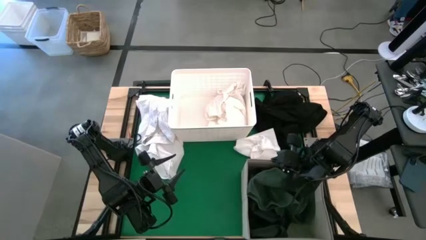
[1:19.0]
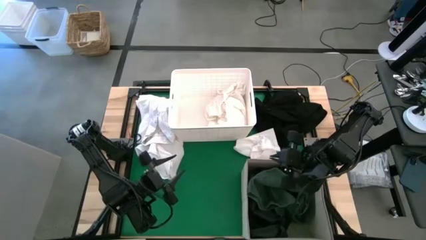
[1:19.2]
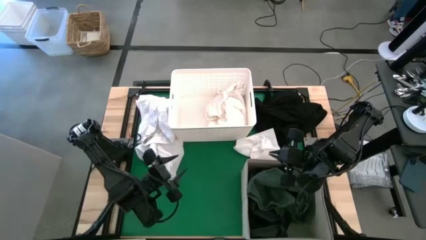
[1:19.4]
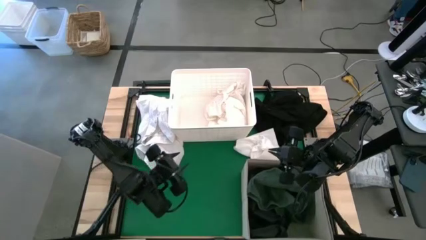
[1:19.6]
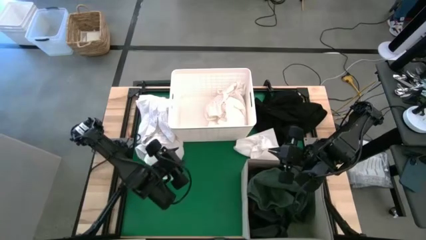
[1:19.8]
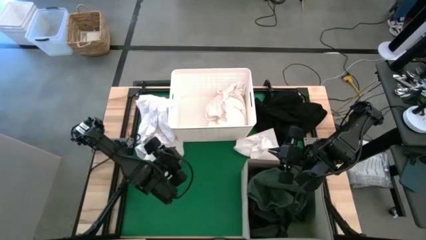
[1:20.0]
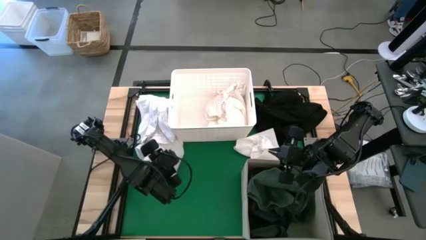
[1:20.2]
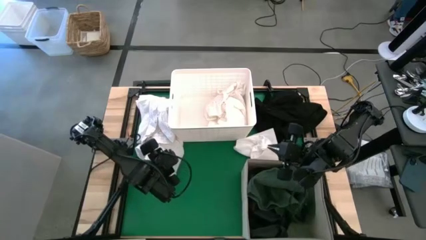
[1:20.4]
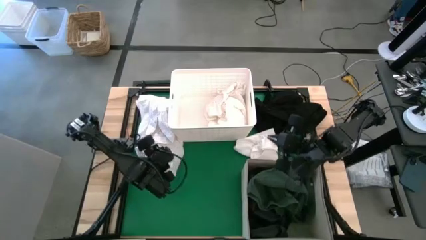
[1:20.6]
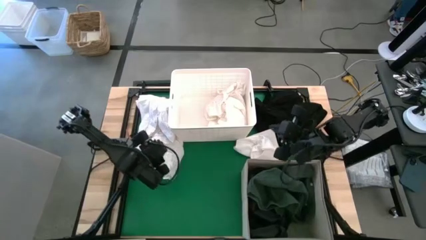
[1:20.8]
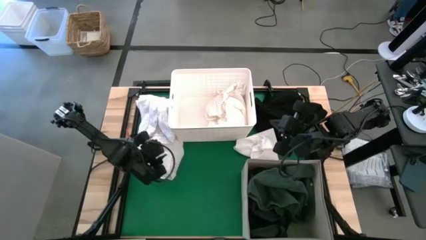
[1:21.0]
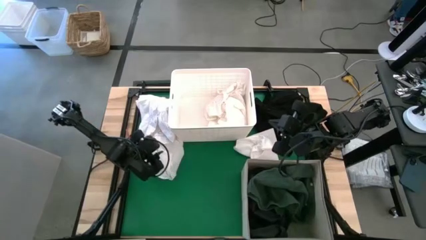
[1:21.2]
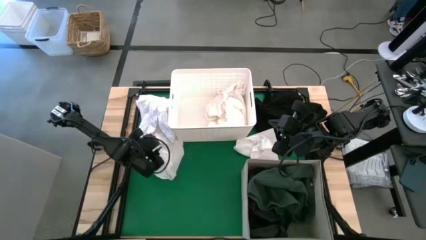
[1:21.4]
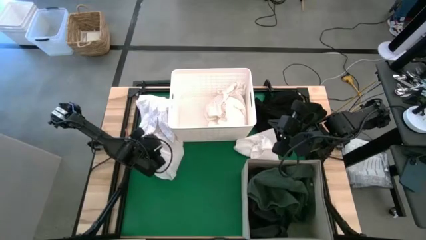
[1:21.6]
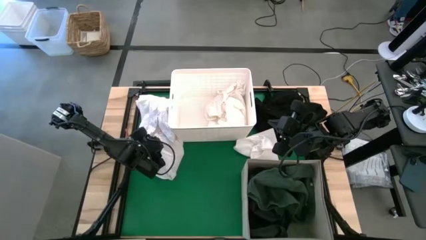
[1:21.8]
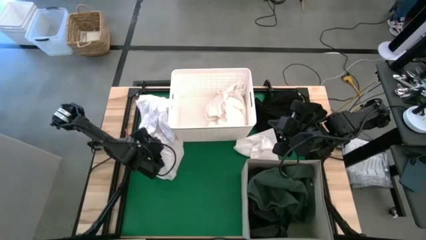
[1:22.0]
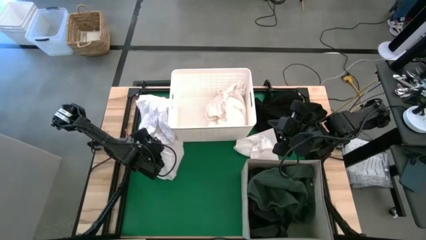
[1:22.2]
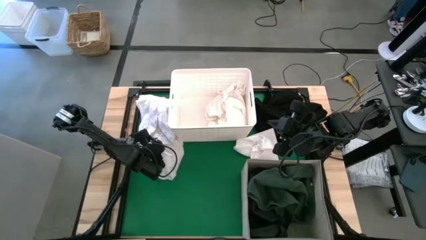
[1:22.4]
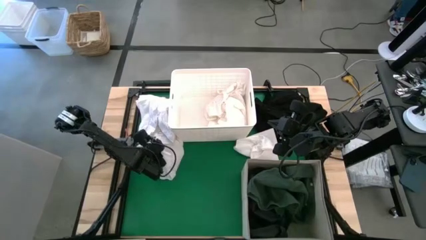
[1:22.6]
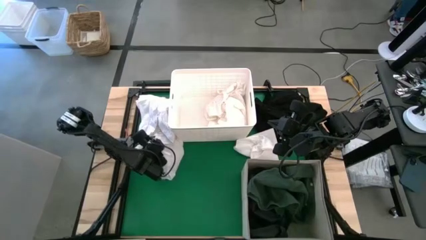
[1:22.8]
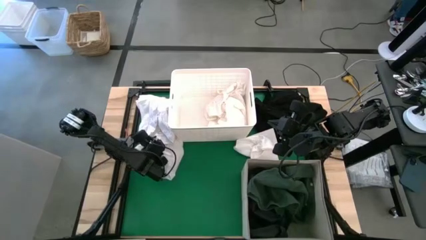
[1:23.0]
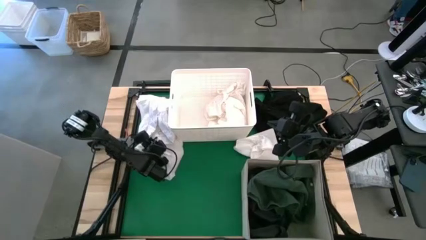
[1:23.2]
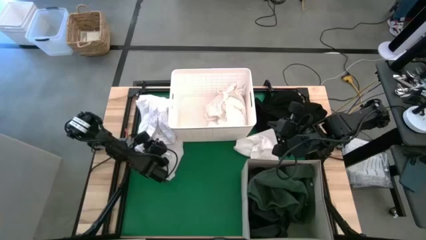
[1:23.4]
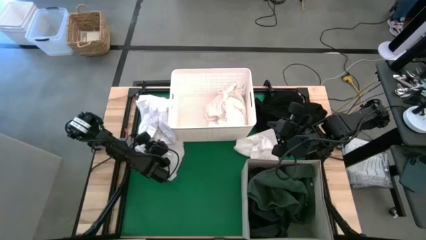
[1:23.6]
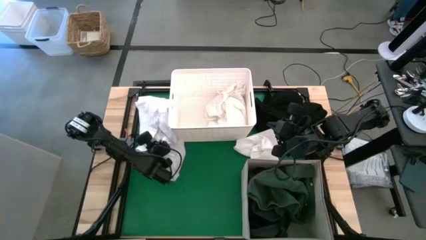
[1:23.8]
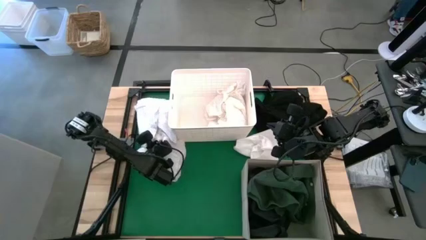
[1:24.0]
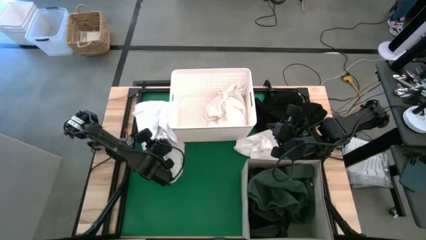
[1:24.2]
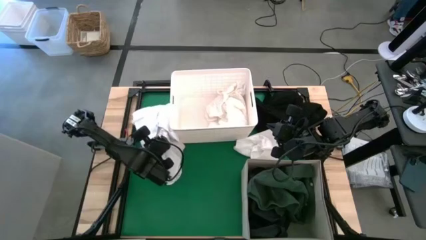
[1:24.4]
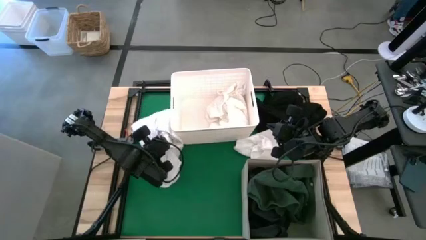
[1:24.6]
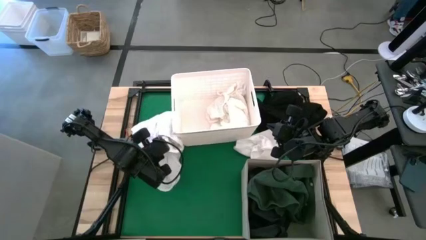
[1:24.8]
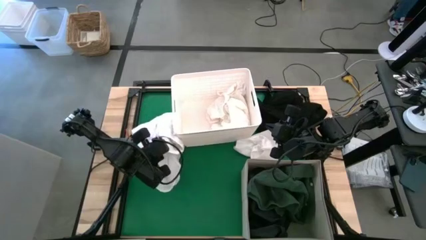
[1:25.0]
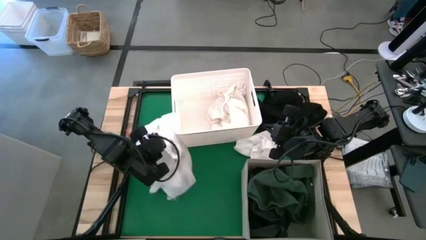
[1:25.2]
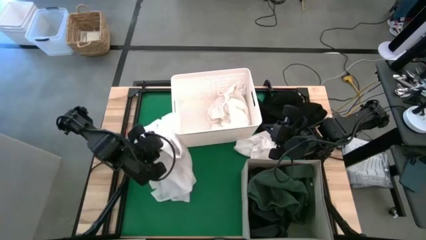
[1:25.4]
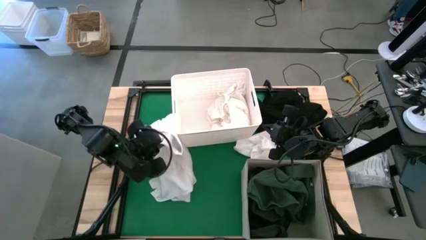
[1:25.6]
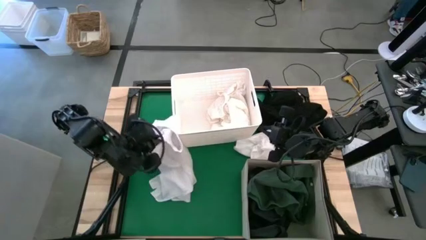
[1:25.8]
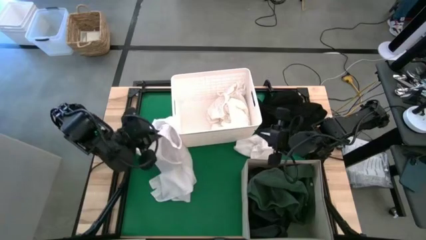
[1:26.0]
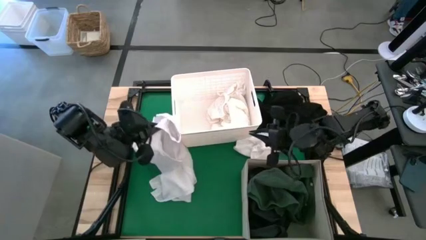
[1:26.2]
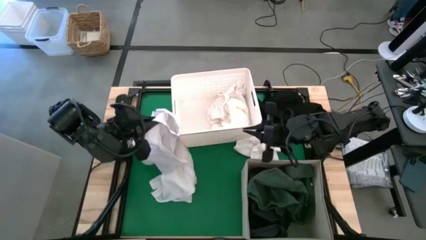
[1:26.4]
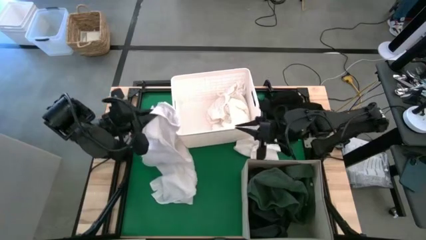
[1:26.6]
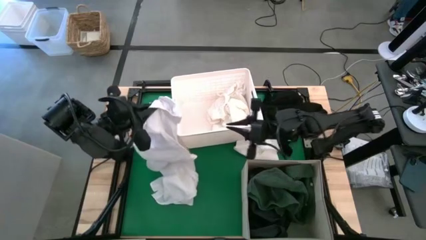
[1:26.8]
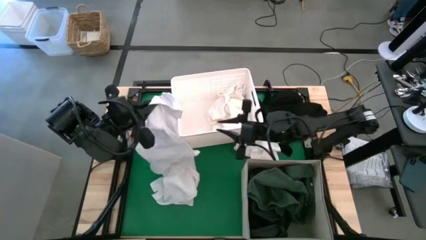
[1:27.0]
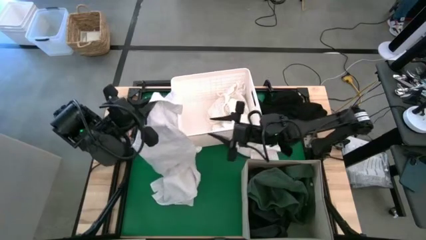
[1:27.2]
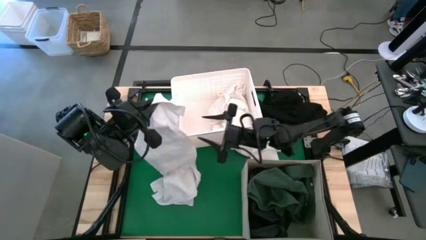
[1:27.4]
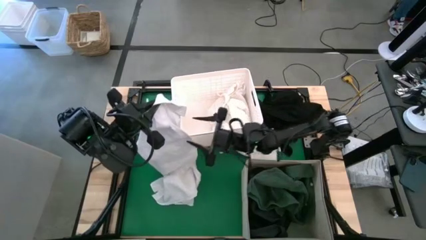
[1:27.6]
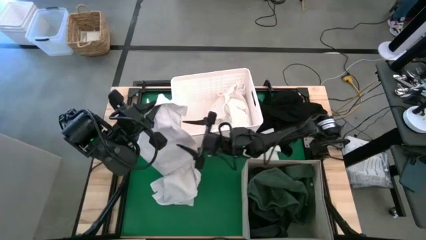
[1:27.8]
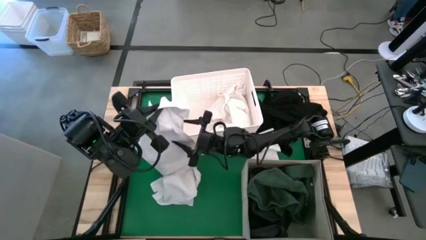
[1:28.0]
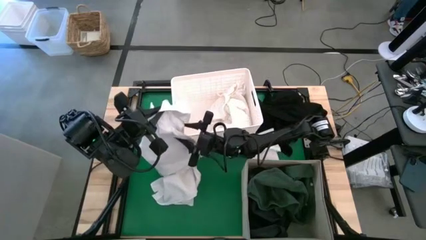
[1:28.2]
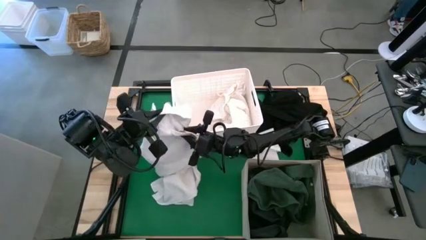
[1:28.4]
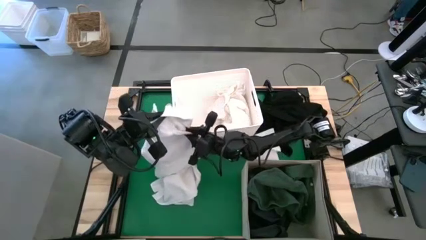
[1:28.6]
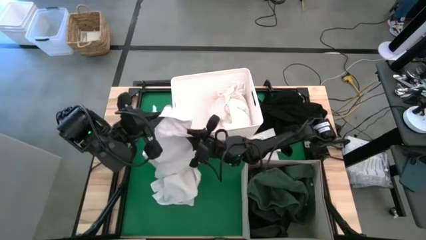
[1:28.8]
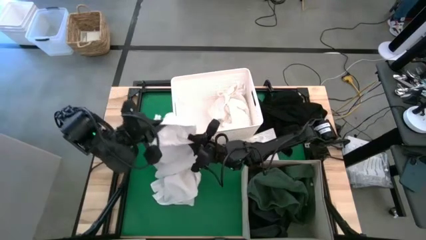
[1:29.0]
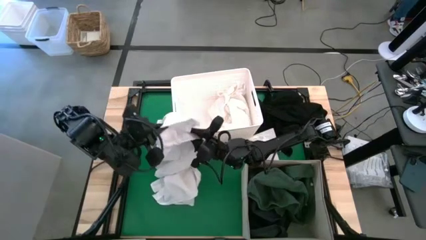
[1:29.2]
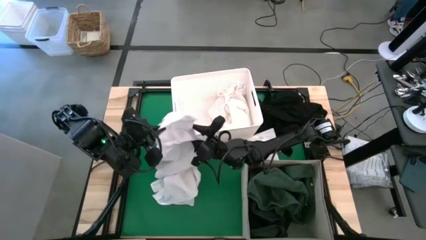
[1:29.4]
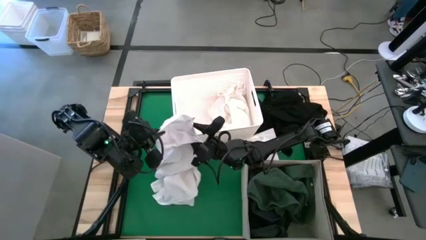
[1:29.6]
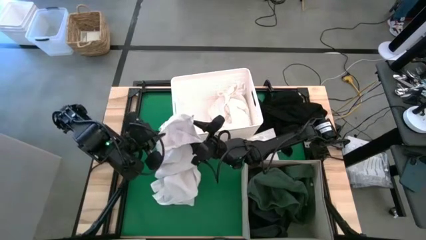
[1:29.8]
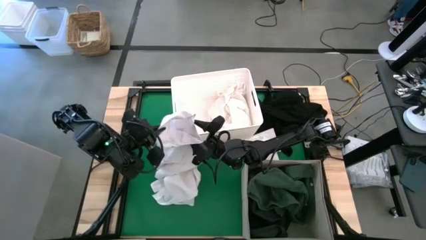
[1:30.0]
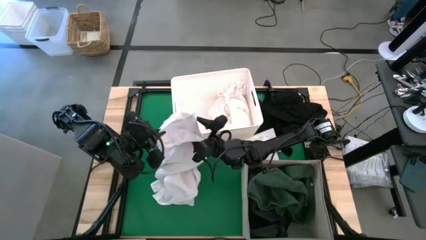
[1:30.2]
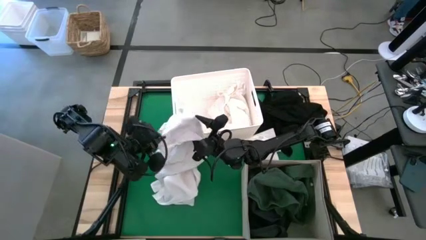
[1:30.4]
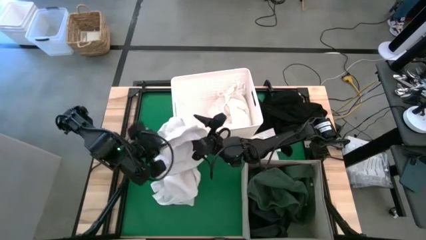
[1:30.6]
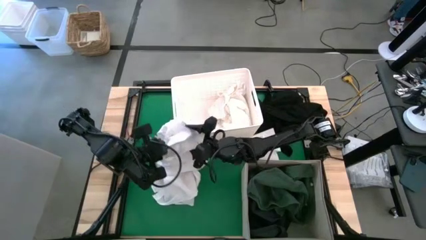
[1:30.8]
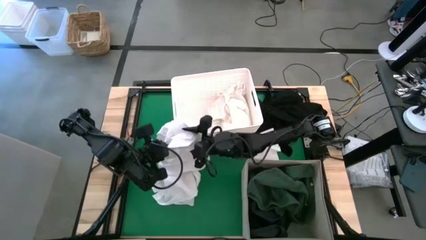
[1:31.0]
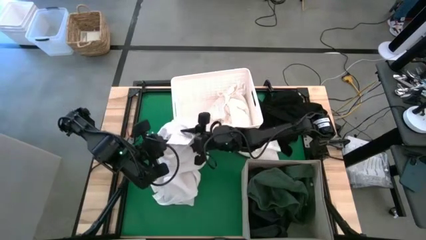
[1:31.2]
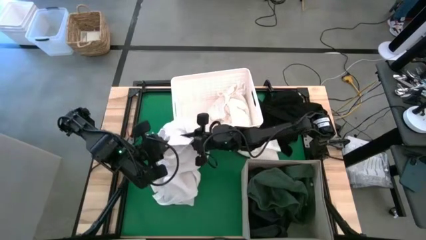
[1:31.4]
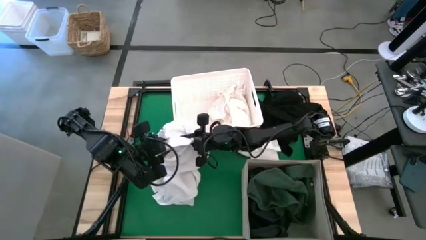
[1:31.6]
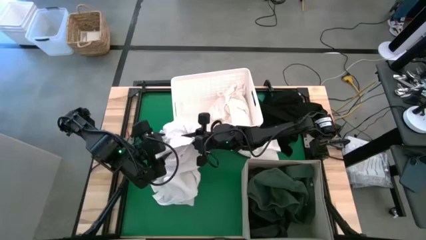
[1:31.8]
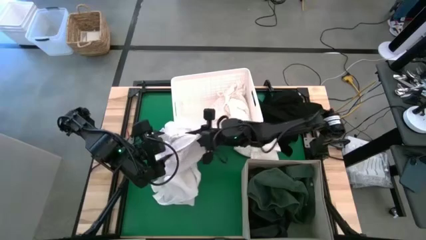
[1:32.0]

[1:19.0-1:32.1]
Put the left white cloth into the white plastic storage bin
